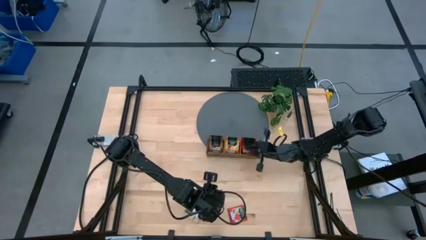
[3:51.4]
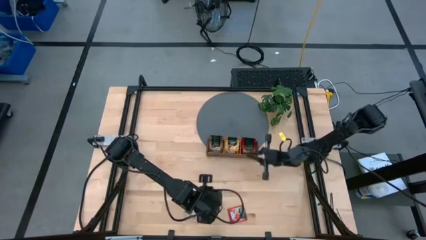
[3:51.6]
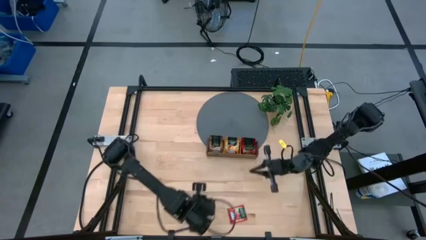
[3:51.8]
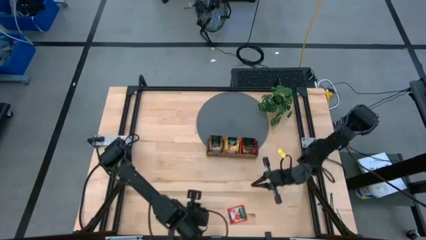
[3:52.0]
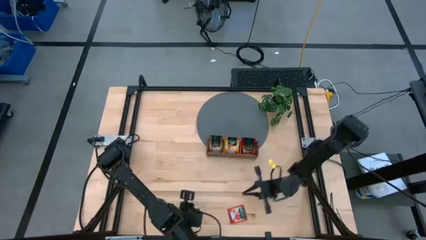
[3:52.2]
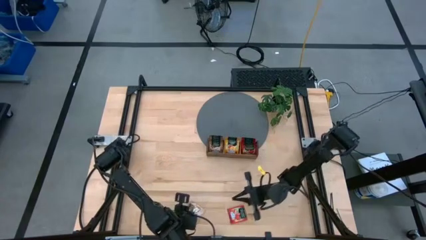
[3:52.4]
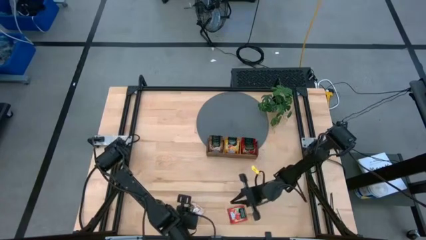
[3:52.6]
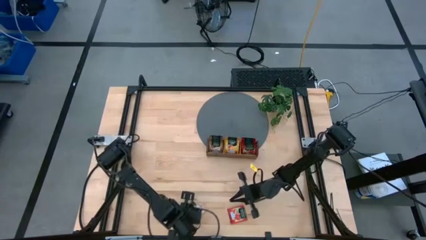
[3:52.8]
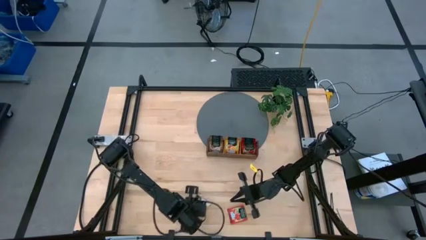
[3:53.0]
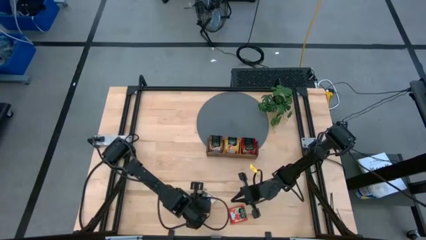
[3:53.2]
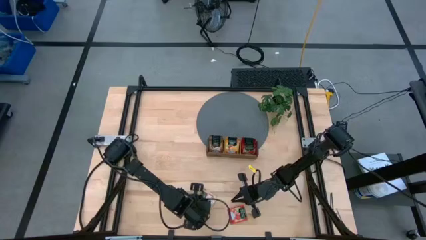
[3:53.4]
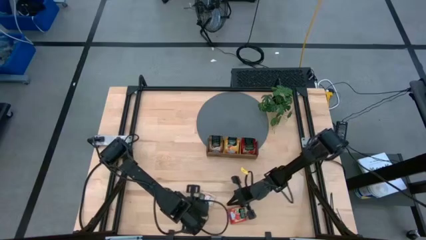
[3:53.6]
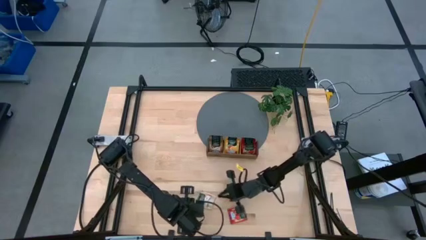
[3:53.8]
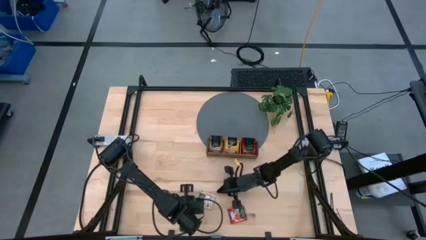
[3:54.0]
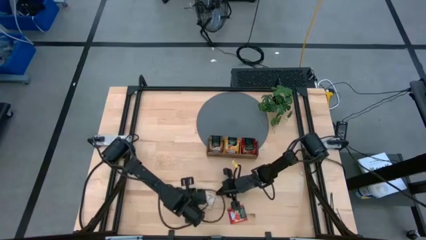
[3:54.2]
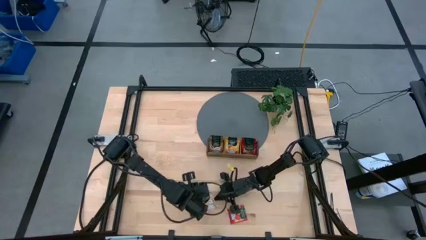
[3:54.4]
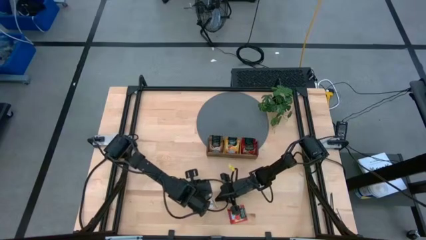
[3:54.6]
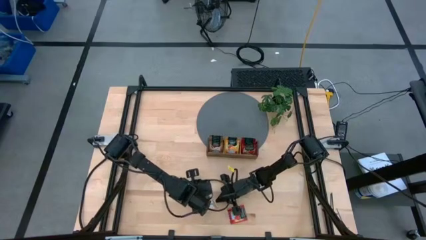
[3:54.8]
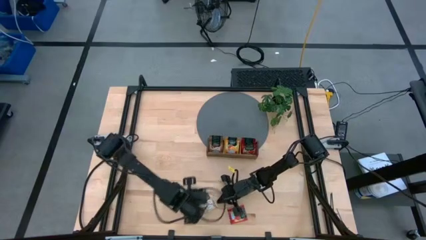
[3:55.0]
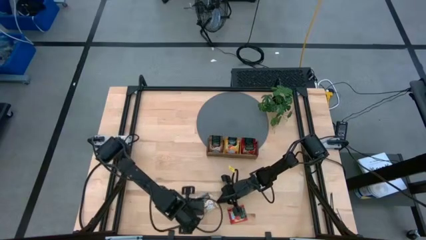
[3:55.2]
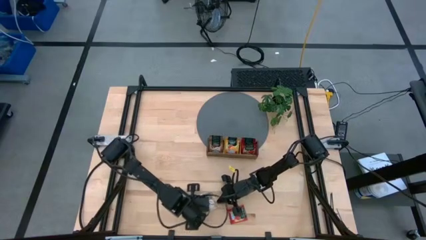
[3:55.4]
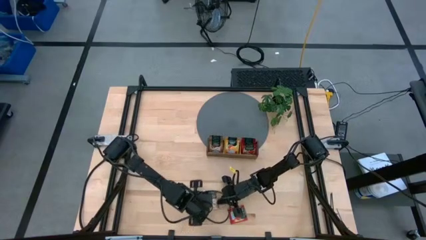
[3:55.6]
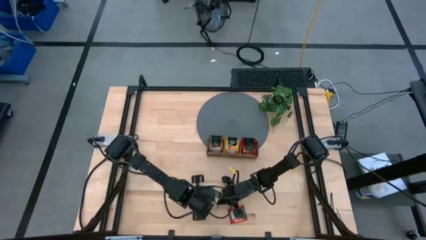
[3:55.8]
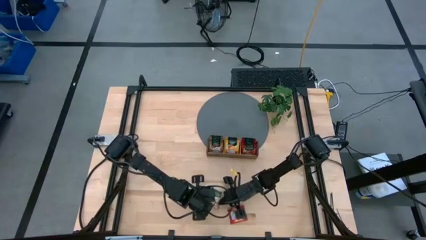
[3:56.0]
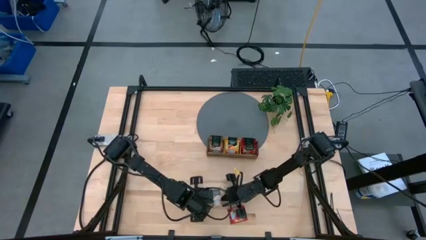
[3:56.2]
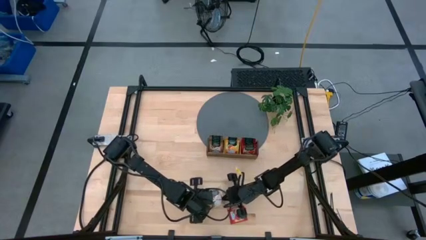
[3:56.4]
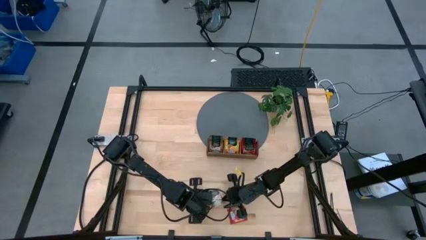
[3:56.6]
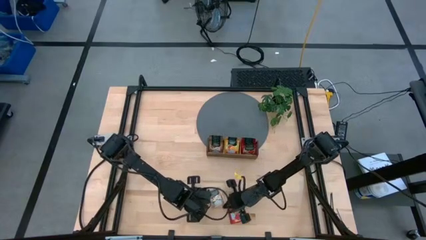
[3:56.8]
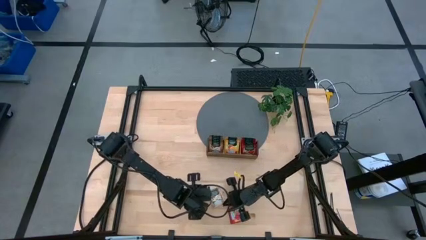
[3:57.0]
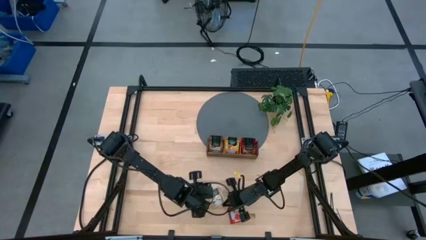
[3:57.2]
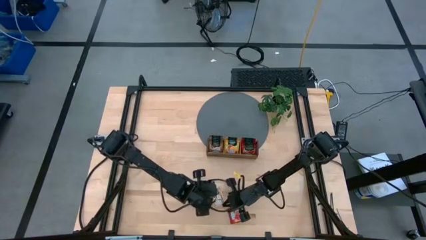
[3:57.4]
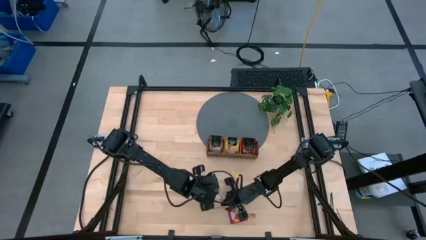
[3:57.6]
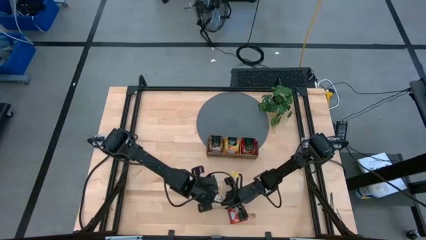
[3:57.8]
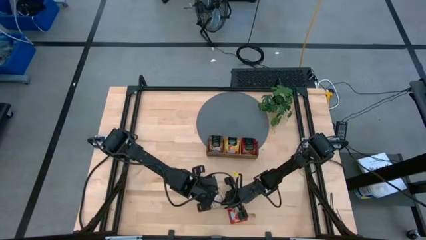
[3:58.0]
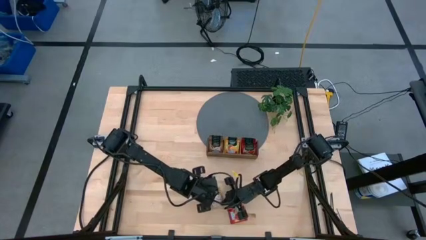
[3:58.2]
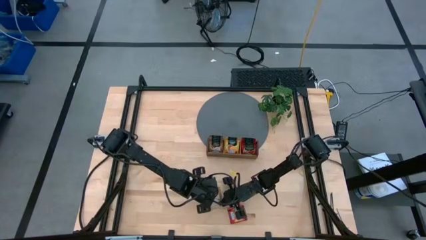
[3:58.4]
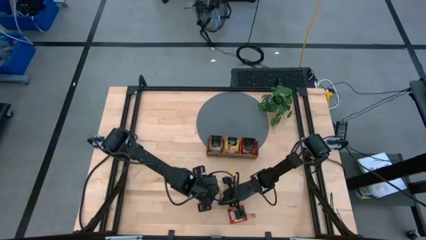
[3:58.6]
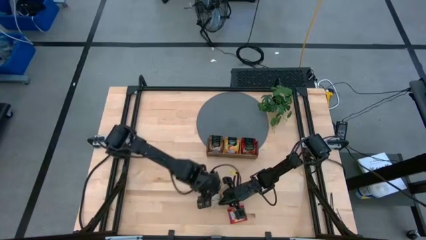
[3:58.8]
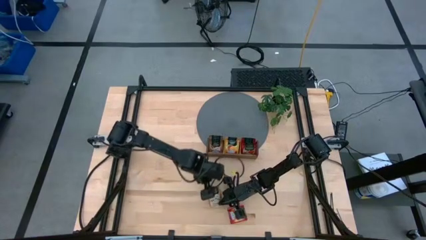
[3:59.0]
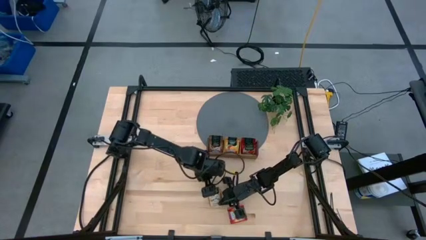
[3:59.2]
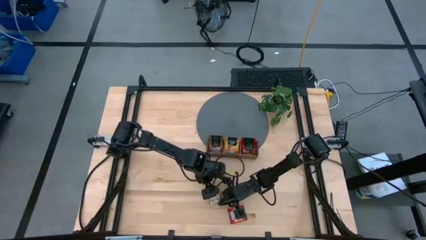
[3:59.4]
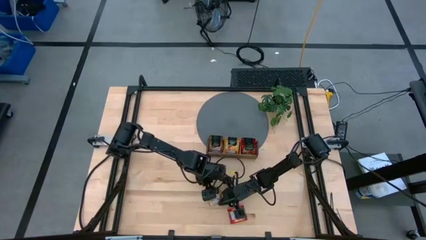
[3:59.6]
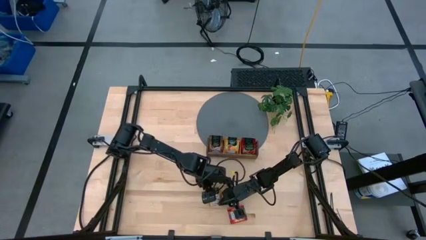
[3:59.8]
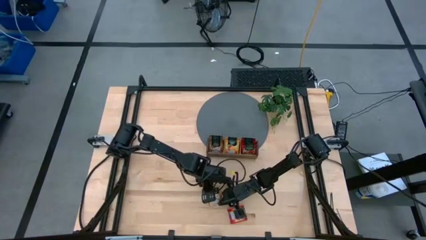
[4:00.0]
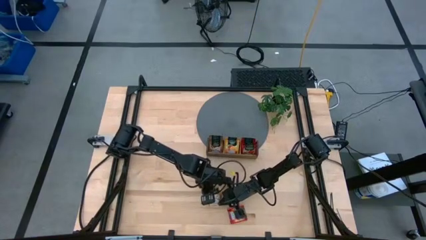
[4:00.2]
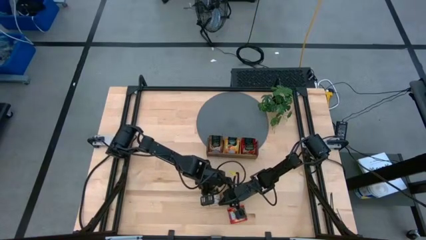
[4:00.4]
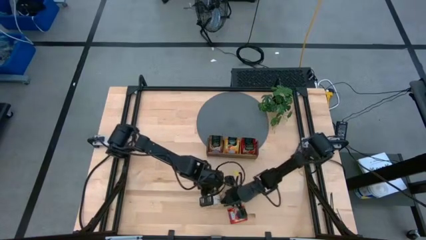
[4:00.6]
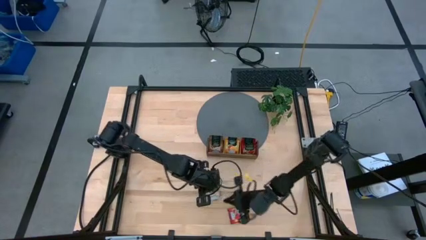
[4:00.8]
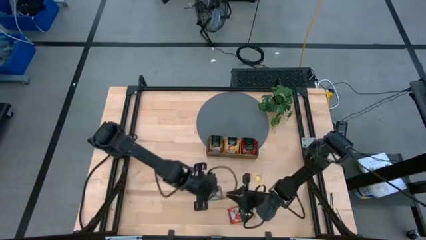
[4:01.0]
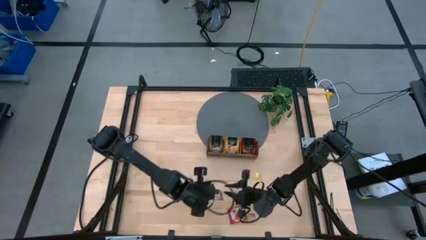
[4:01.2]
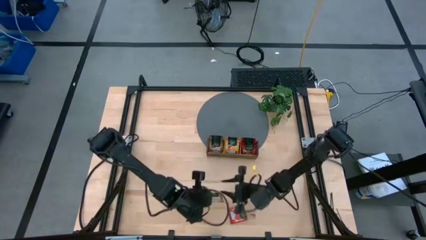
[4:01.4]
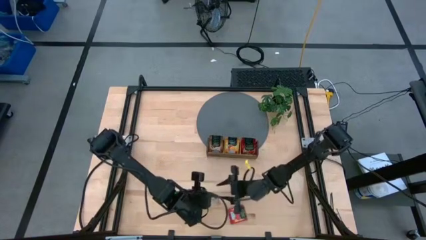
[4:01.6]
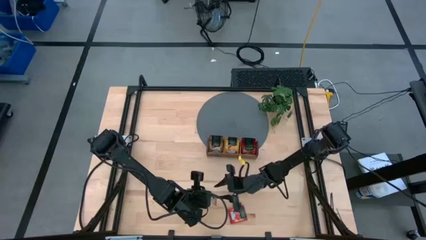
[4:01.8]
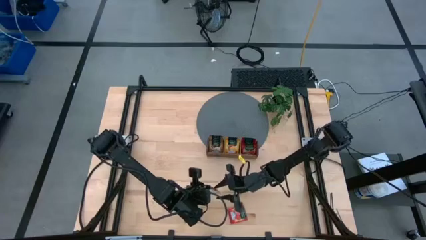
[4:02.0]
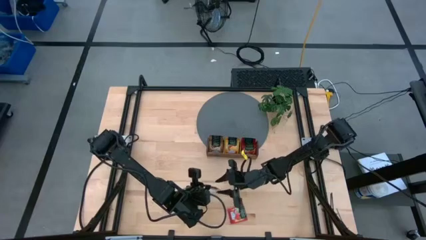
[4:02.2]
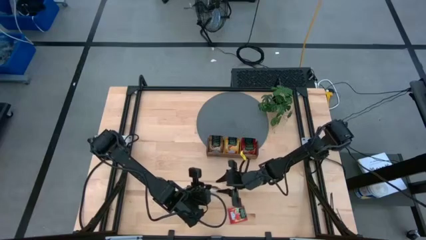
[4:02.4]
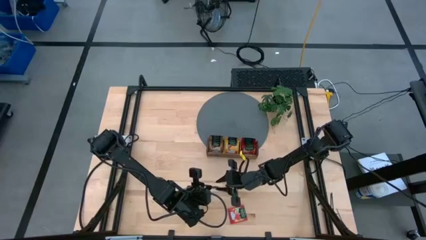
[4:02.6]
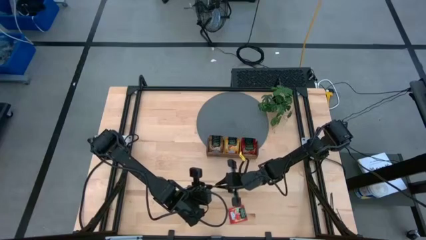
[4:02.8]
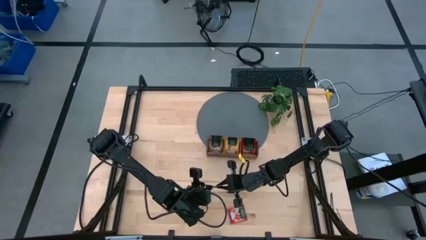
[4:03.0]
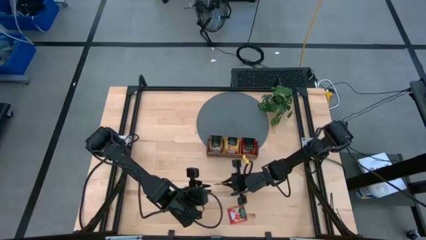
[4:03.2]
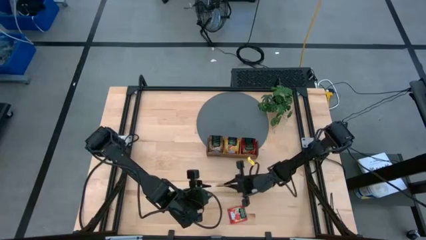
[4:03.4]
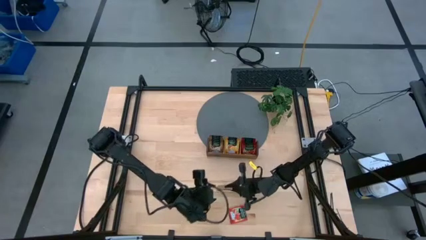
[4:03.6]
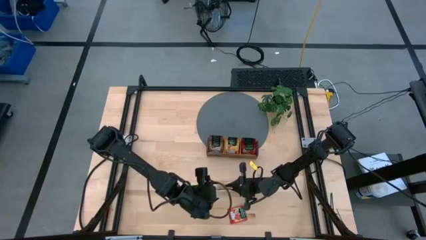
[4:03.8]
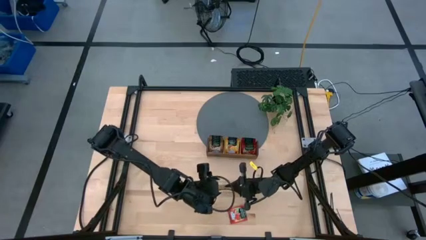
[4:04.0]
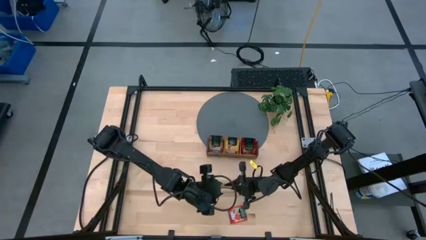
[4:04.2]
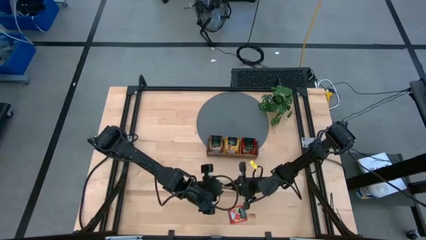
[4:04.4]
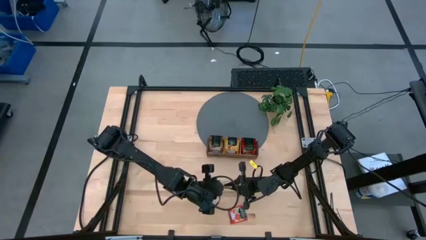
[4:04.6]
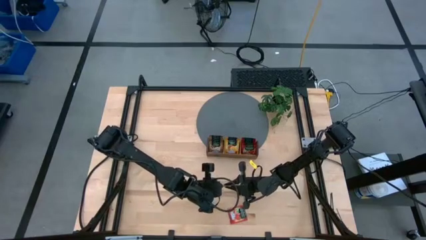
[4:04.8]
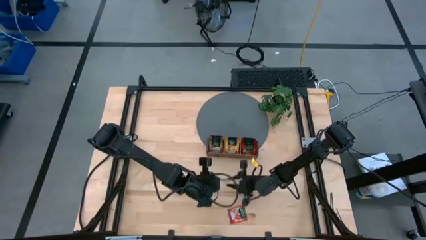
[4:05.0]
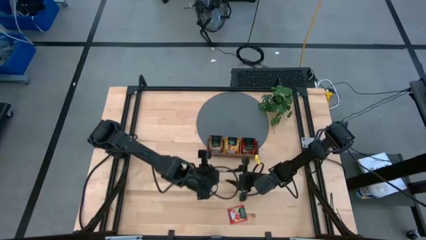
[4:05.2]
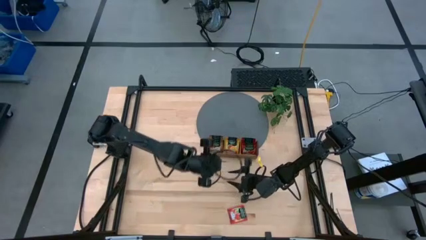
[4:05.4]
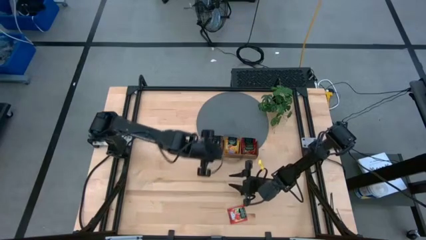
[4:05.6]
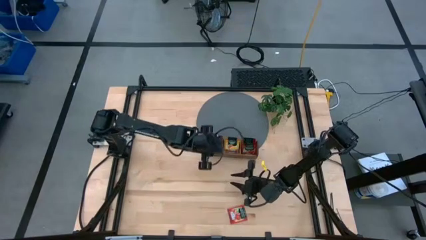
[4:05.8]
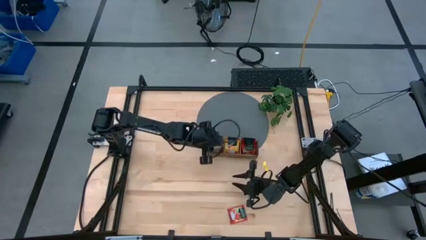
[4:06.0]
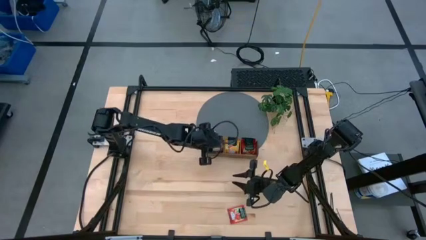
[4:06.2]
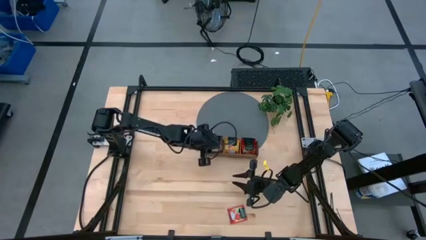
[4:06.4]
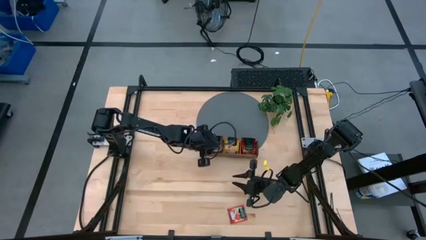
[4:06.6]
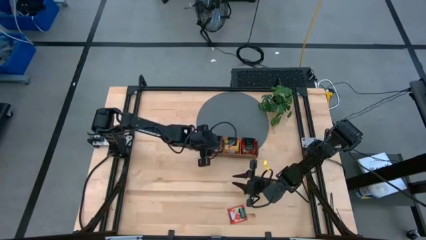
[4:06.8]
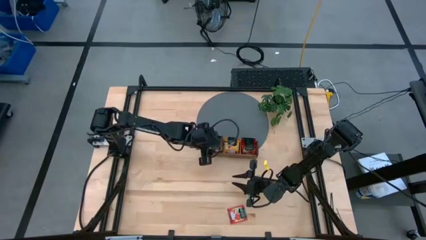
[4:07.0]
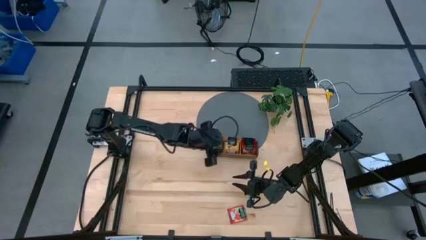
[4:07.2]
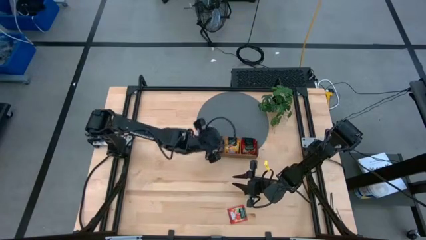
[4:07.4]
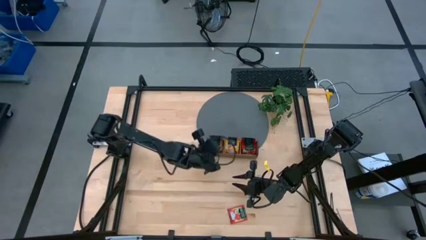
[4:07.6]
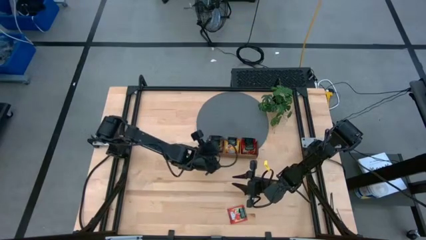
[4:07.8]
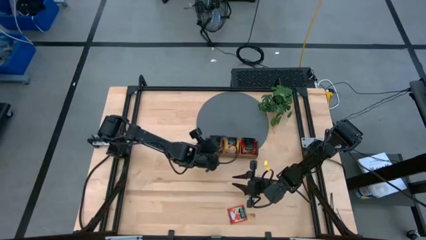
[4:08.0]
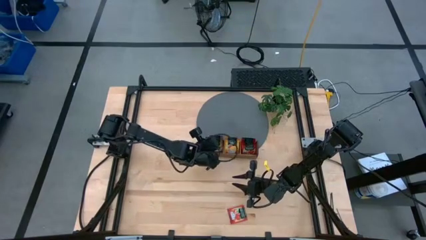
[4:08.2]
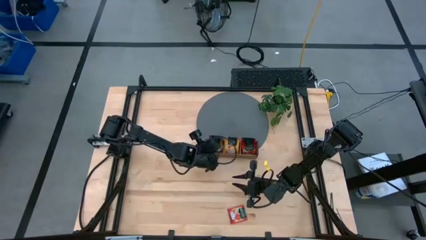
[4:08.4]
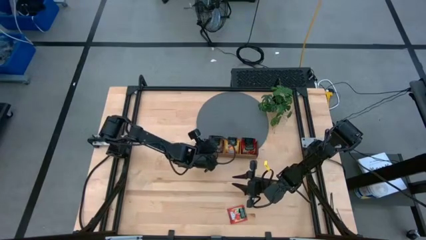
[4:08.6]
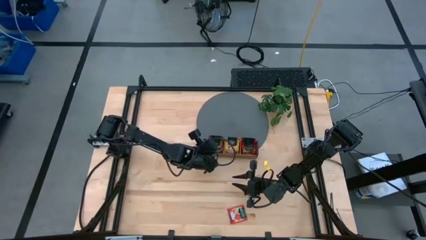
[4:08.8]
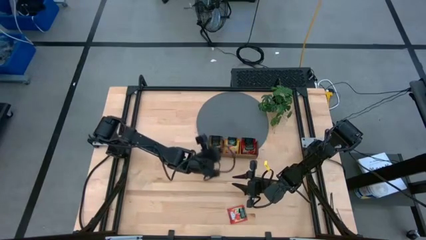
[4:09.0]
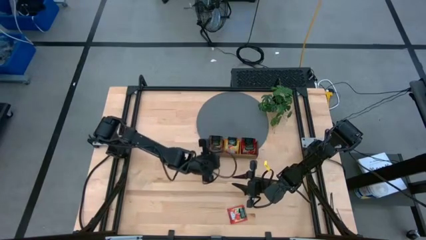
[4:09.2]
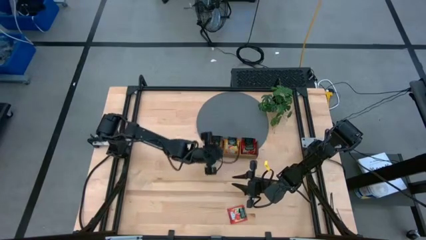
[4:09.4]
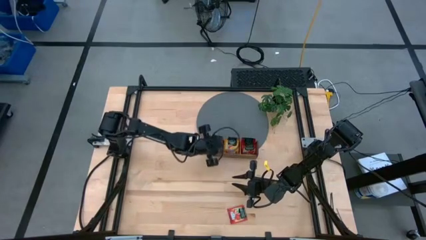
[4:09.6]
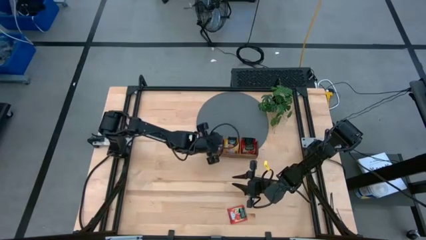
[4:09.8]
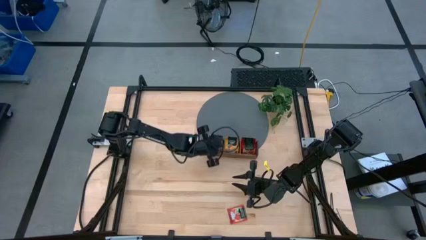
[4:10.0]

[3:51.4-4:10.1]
Task: Pick & Place Tea
Put the brown tea bag into the left wooden organizer
